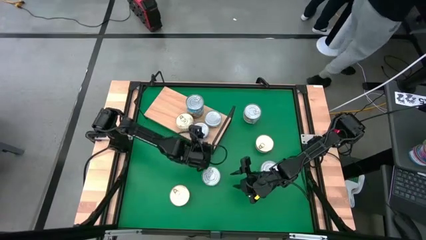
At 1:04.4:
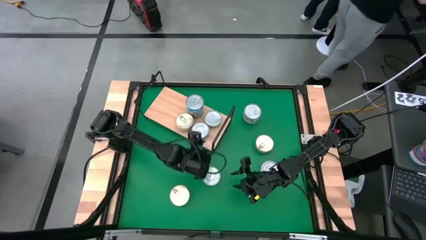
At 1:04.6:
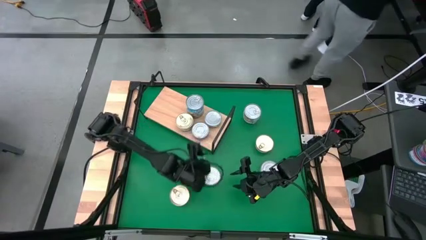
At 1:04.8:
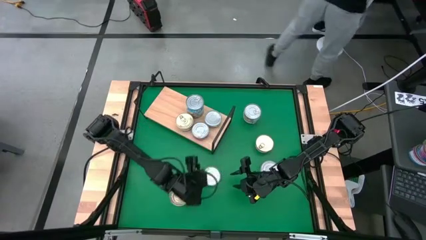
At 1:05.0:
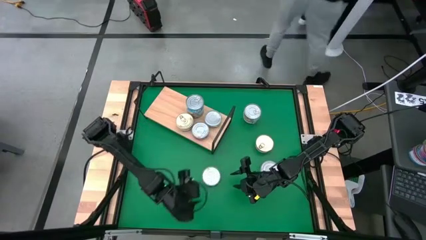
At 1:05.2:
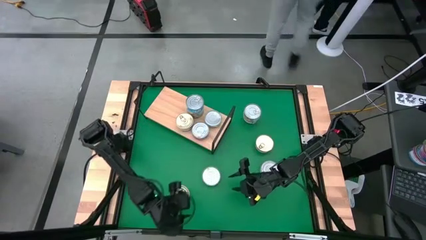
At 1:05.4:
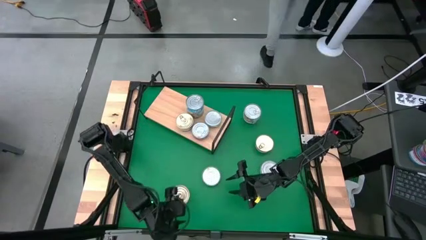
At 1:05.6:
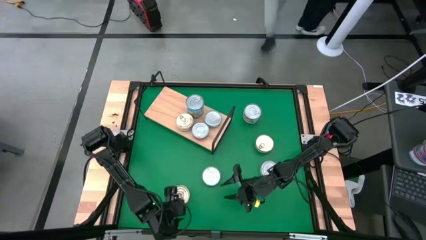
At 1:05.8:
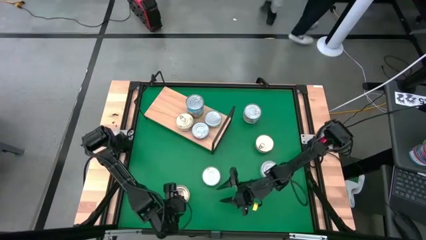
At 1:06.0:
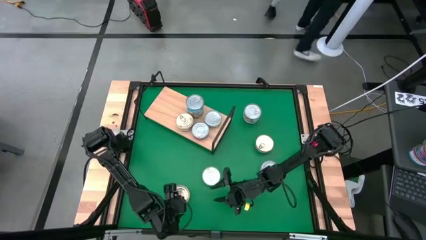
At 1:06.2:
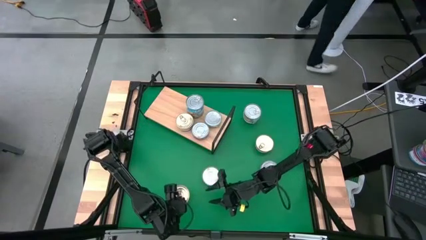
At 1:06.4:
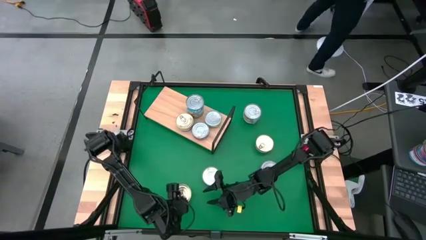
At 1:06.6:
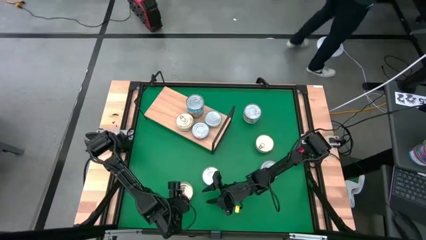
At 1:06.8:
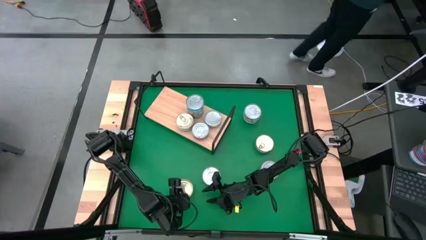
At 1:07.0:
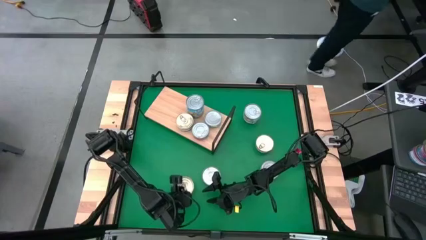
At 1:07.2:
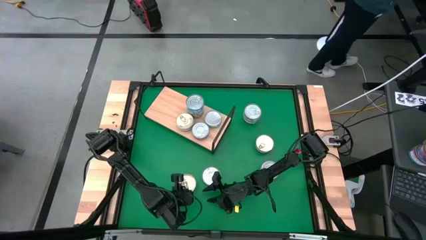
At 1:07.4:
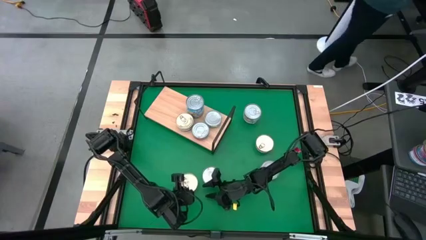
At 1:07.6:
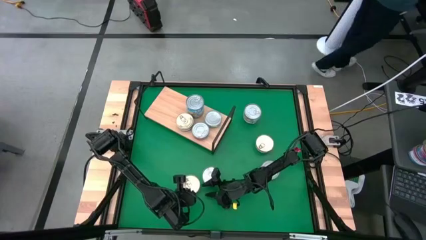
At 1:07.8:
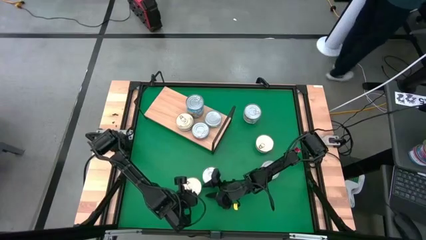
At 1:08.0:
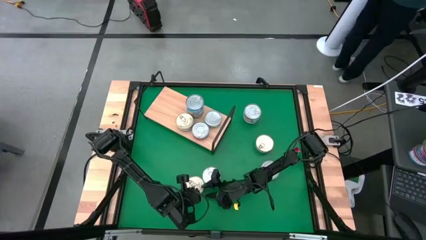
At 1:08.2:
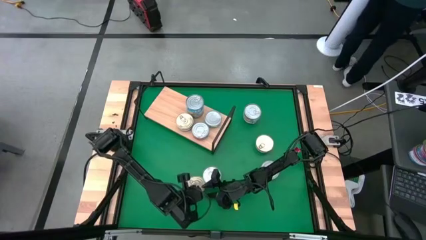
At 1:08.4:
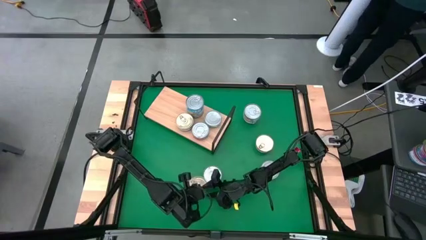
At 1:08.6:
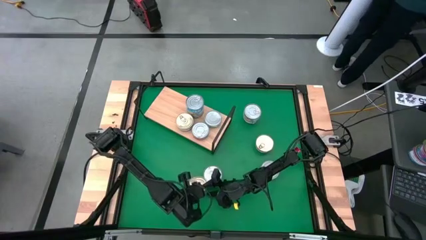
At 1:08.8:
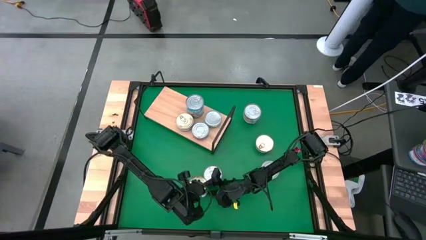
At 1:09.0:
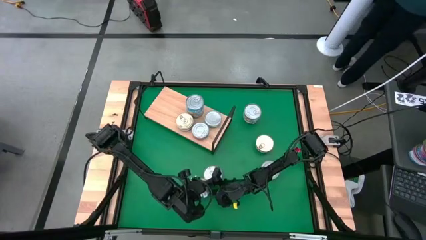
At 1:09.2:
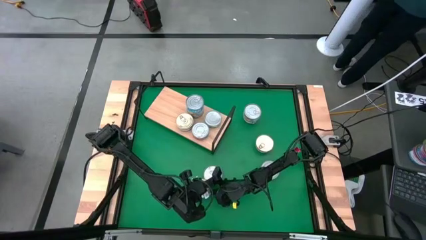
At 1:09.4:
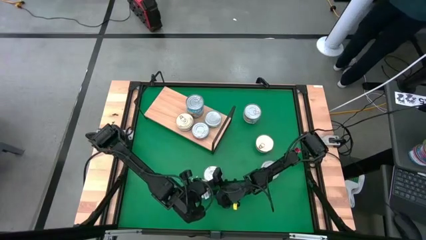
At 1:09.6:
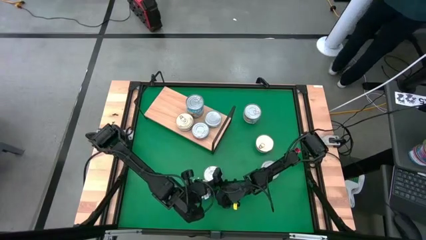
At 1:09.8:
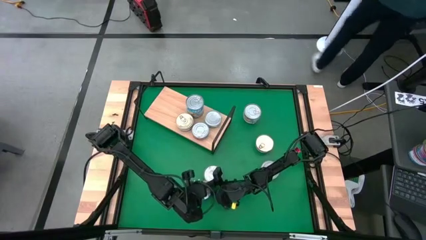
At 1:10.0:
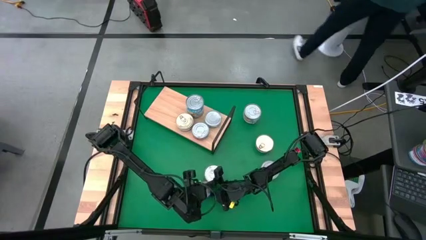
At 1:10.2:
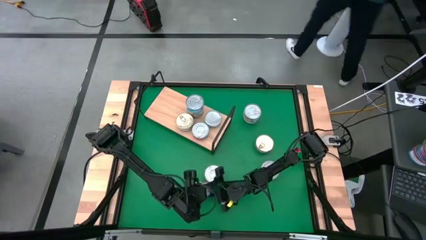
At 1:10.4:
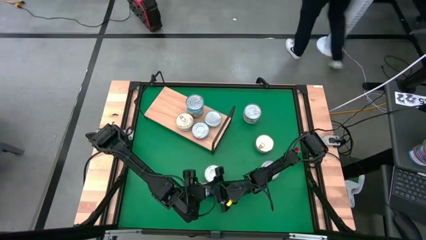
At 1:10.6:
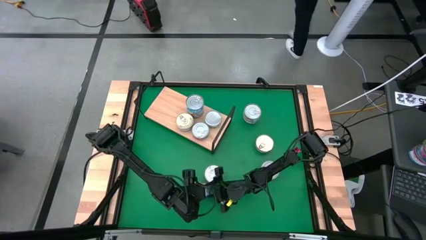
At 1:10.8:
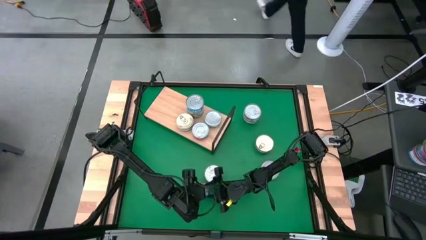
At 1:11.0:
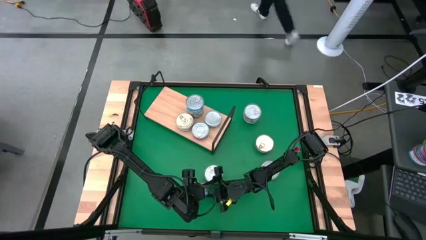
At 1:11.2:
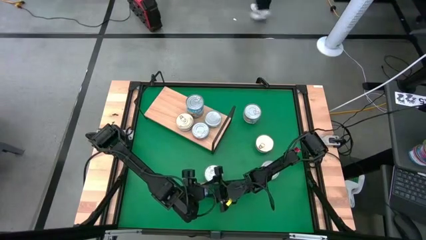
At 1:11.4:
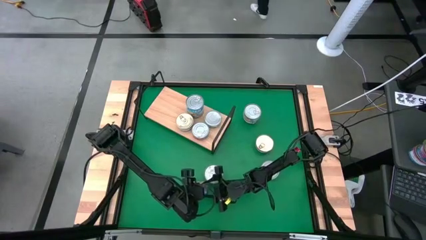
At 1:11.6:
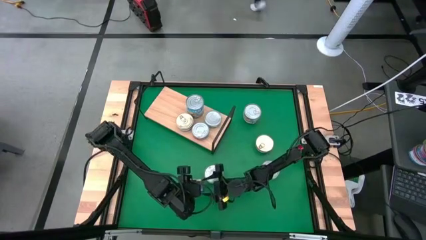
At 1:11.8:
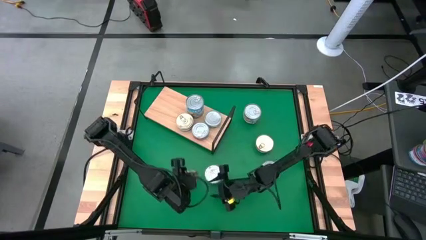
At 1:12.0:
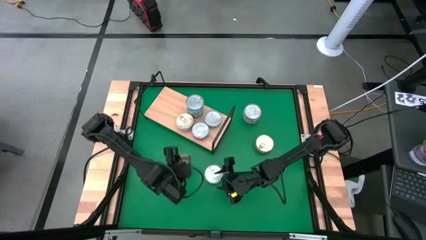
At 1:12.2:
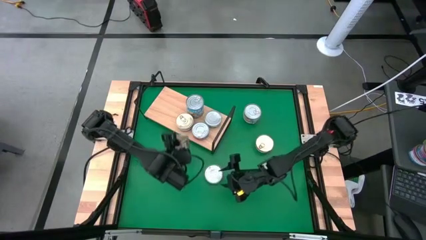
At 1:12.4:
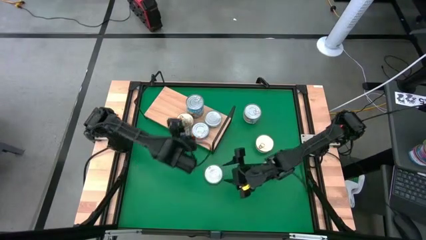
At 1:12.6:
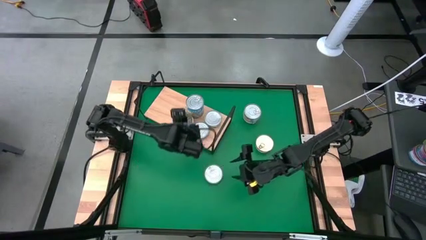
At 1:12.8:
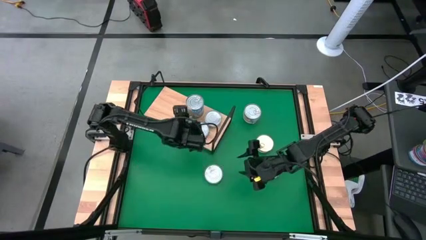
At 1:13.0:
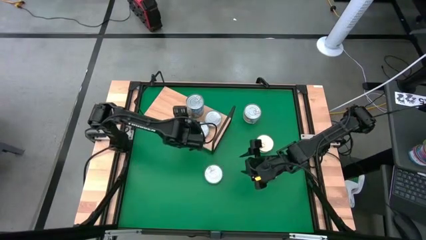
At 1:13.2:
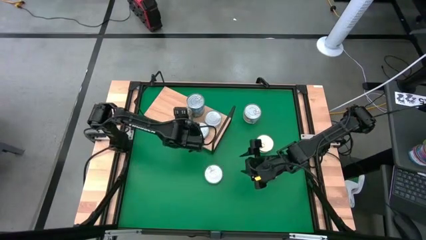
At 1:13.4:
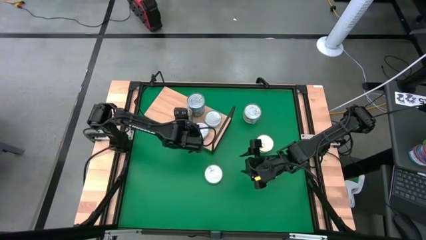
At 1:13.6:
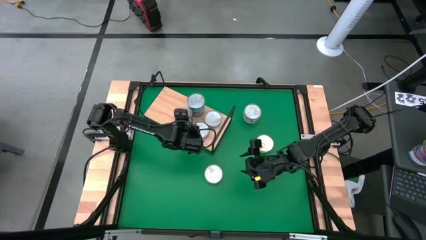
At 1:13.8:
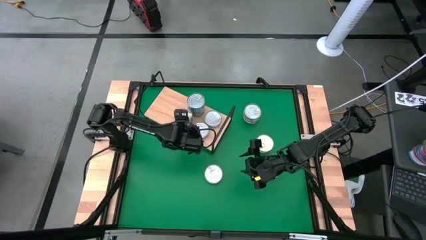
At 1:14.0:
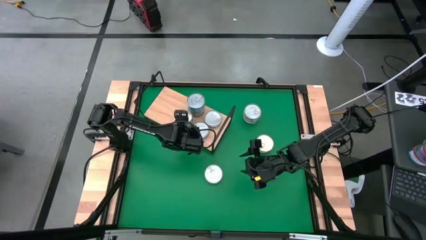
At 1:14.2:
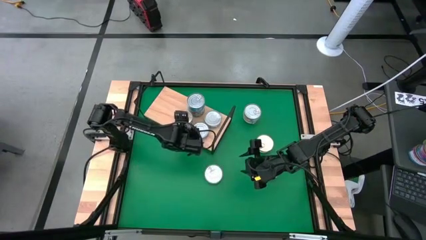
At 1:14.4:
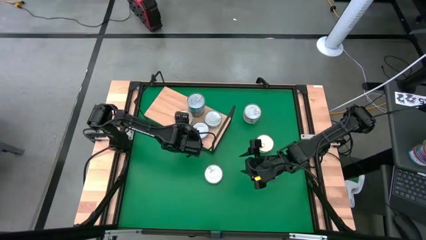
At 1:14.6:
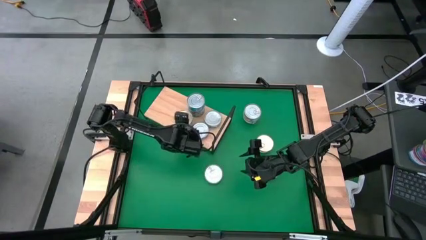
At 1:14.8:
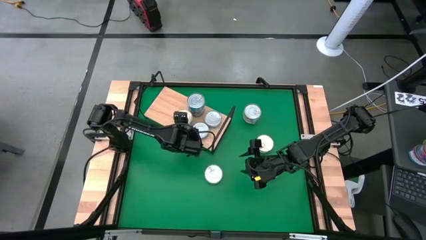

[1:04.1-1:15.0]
Task: Stack canned seafood by type on shelf
Stack the blue tuna can on top of the blue tuna can
